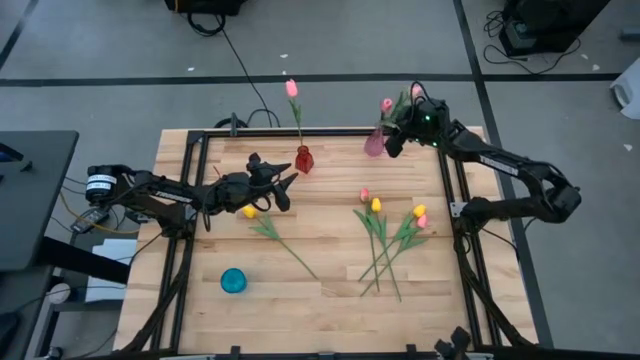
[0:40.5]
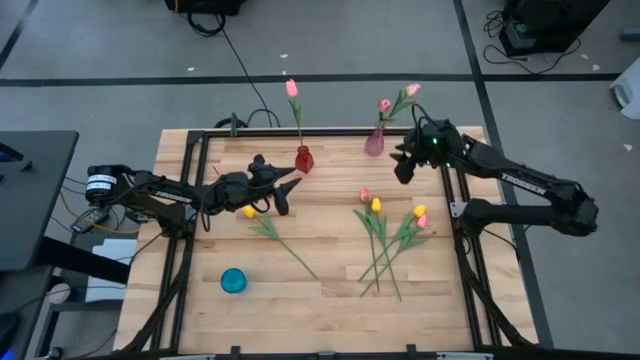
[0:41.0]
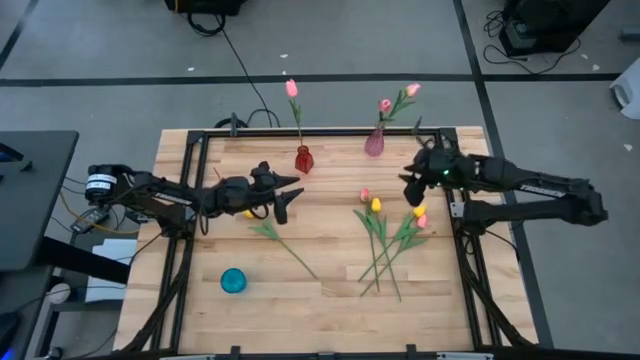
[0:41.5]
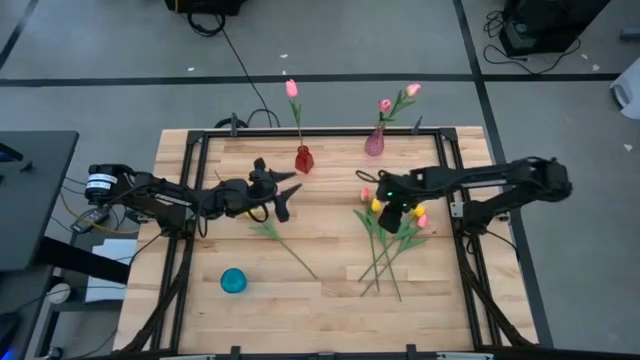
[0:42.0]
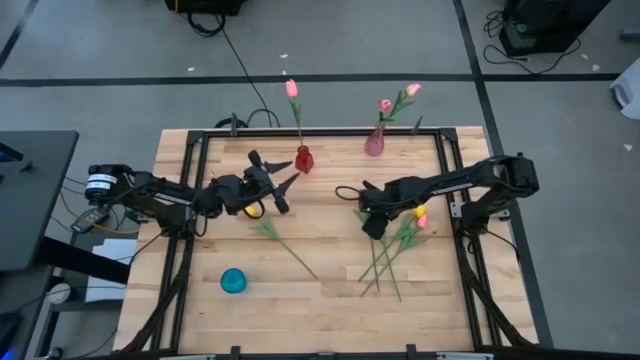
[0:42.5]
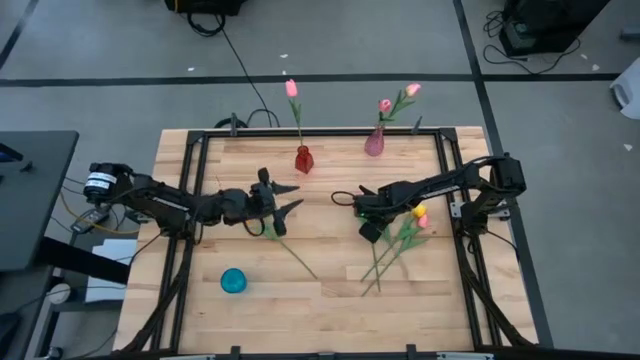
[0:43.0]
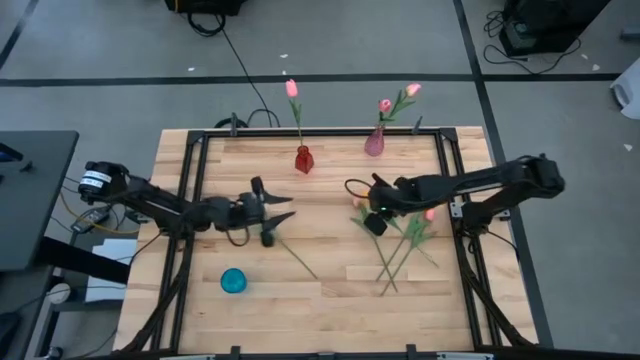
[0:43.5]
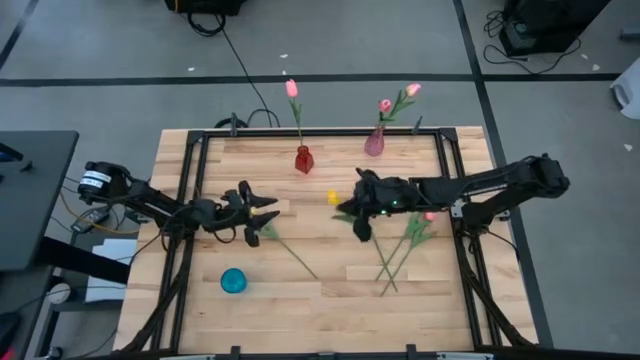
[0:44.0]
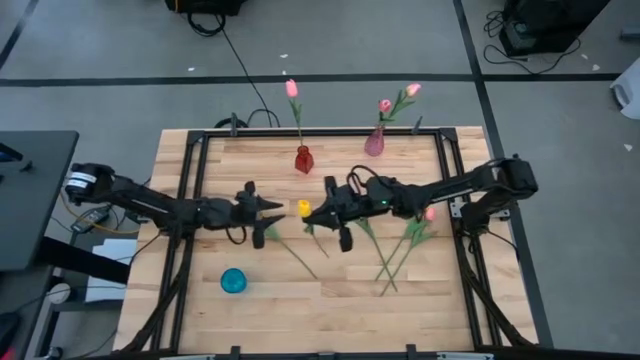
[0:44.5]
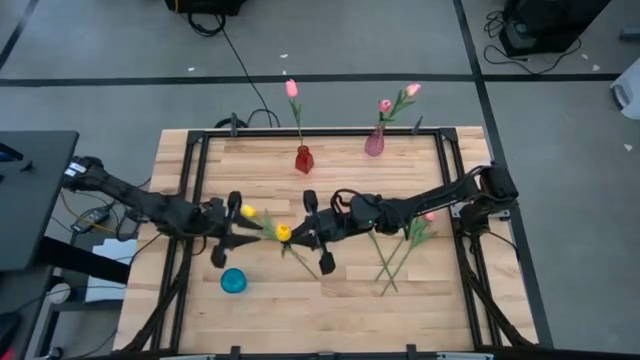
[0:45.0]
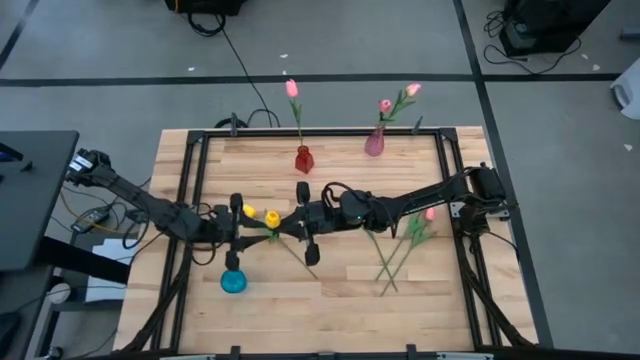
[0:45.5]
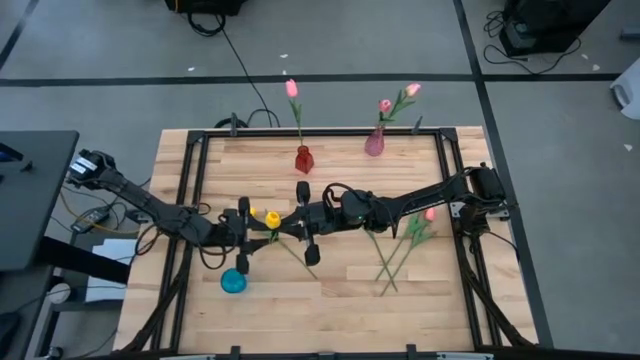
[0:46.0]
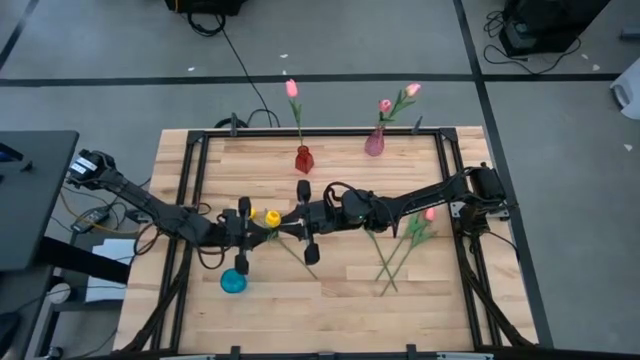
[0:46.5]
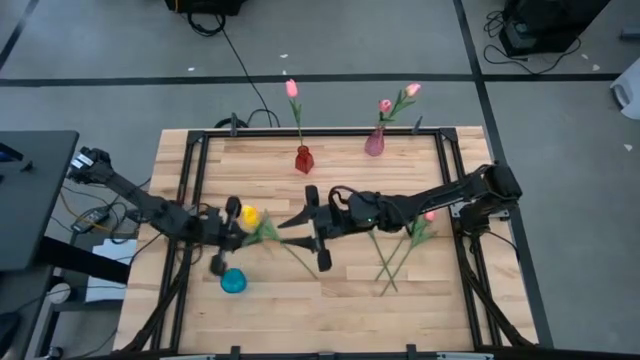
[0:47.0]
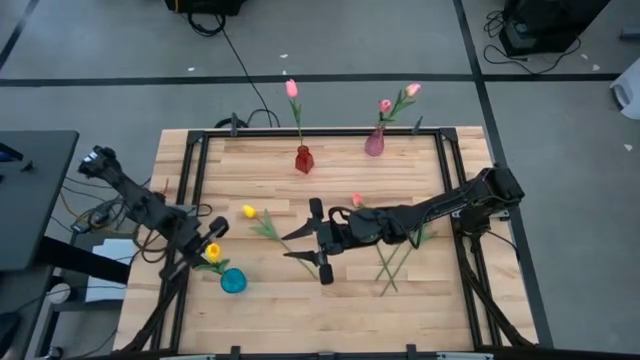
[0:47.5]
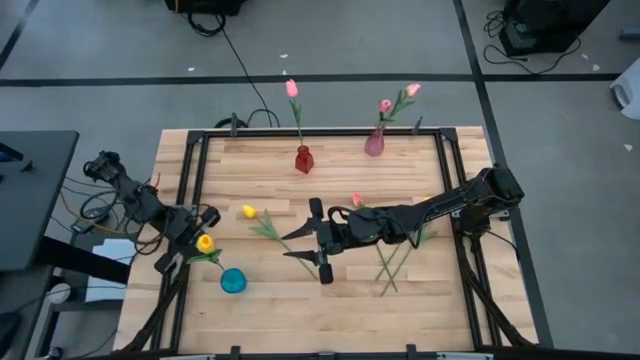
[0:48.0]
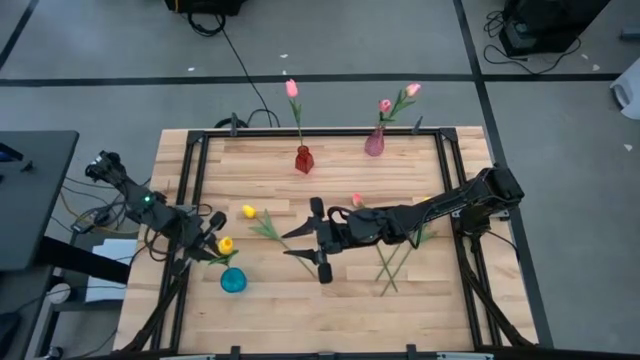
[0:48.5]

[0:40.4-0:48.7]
Task: Sort flowers into vase by color
Put the yellow tulip into the blue vase

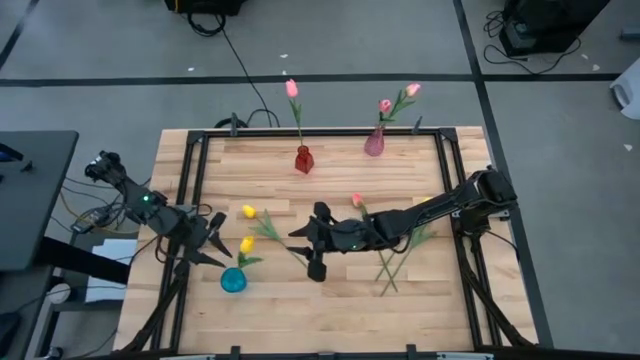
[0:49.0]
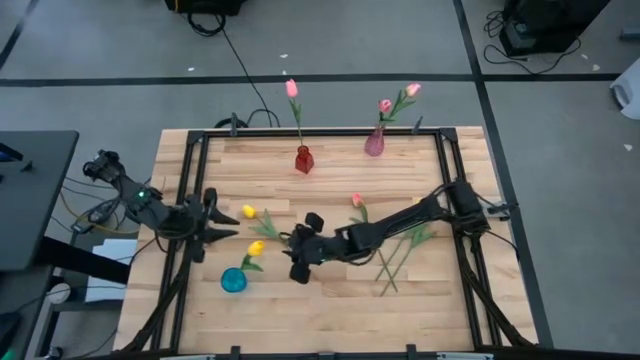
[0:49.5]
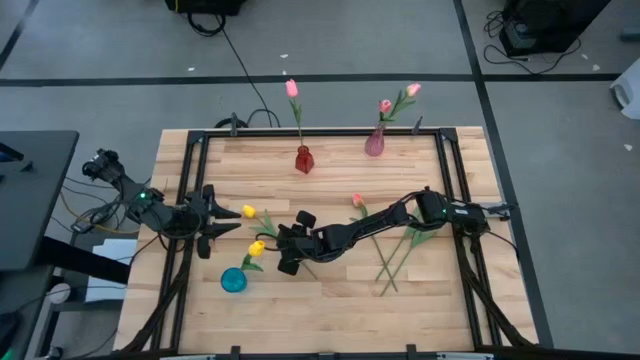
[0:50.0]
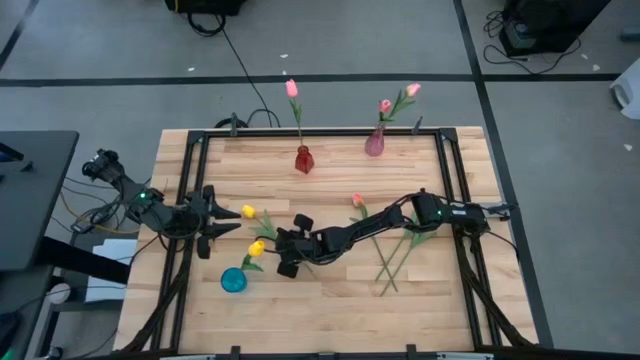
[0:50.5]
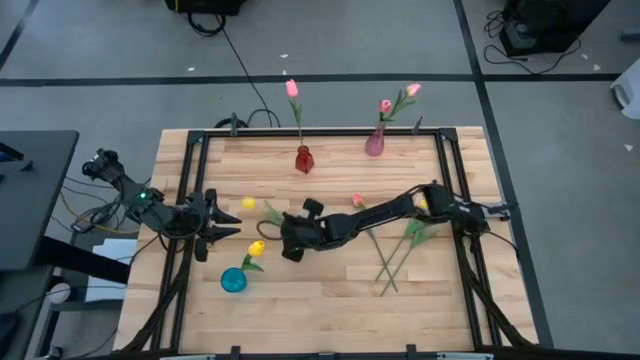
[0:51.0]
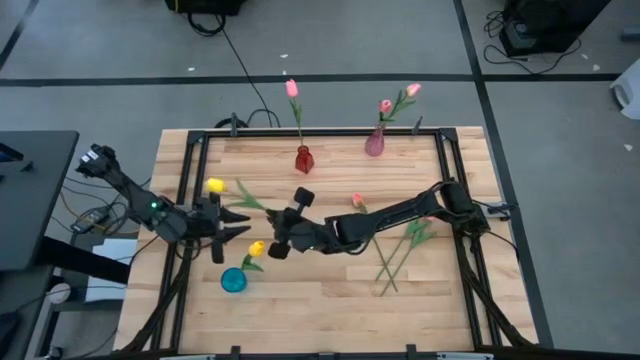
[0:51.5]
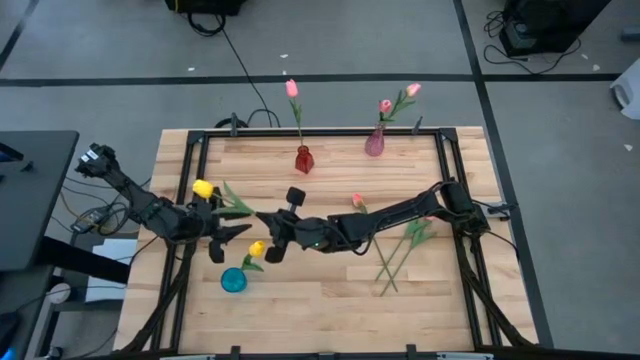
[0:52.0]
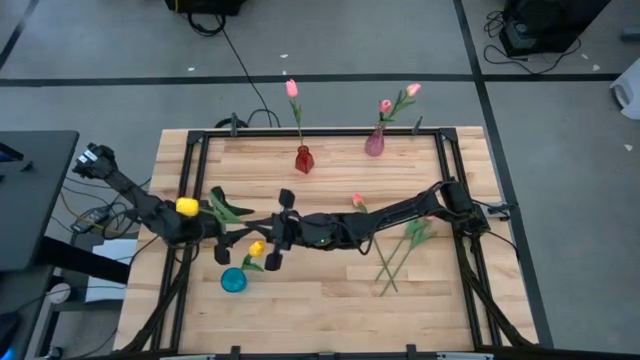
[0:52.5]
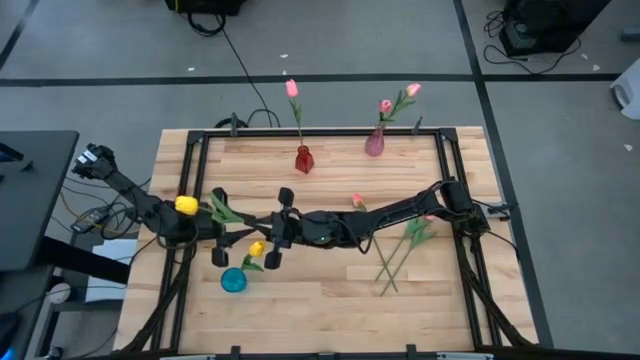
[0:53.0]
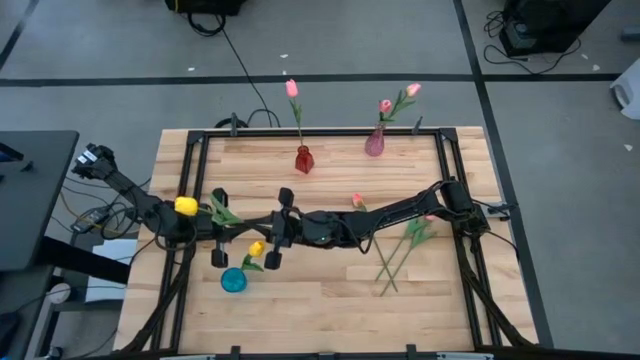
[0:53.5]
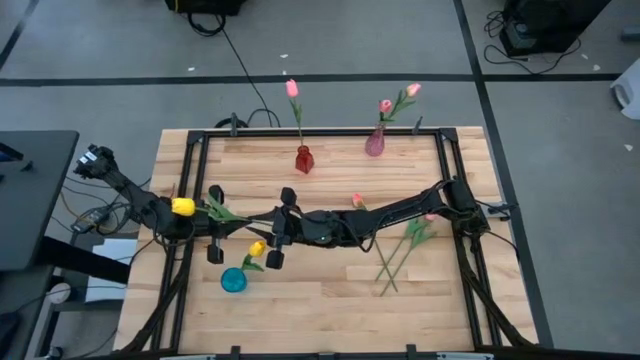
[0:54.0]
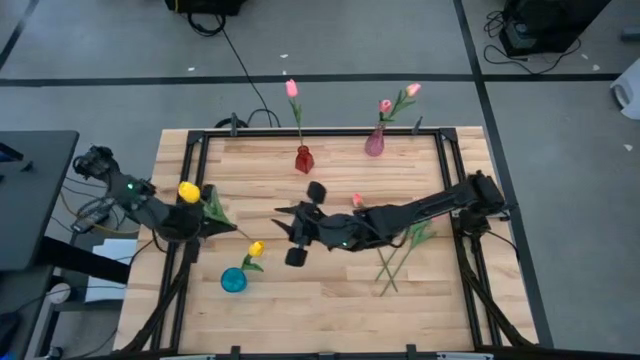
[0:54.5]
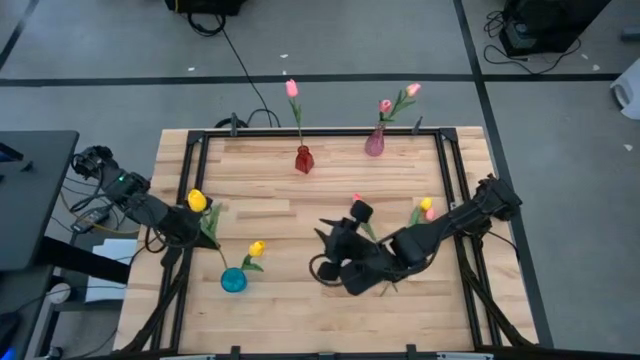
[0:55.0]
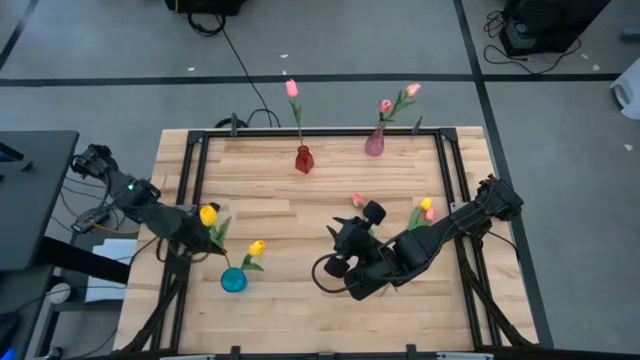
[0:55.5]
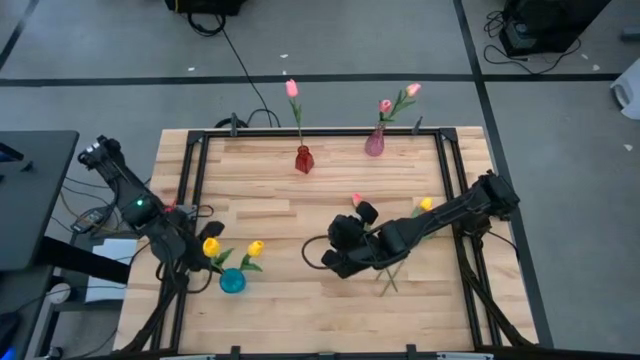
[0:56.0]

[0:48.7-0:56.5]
Put the yellow tulip into the blue vase

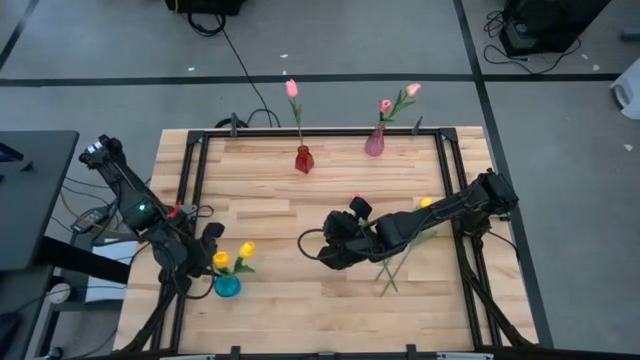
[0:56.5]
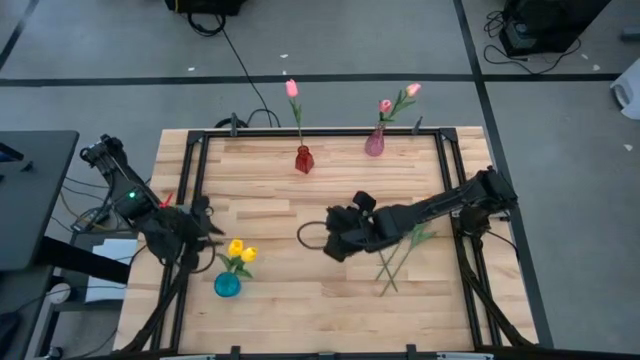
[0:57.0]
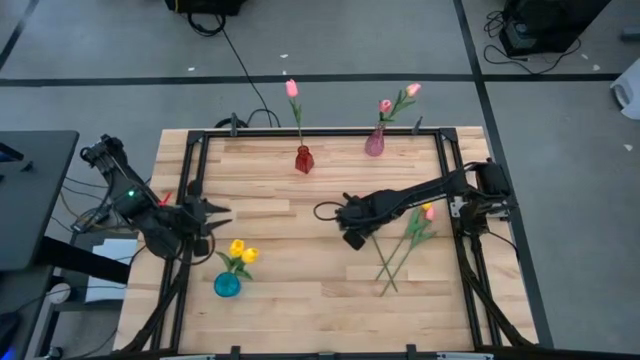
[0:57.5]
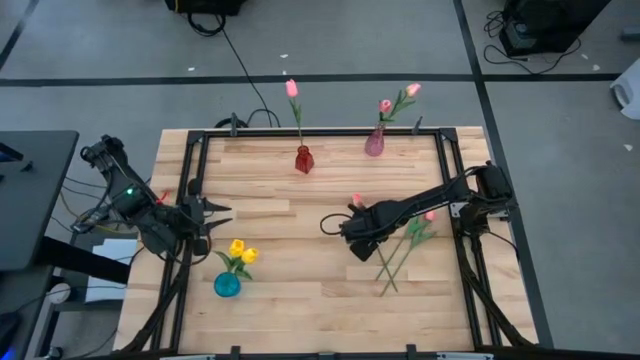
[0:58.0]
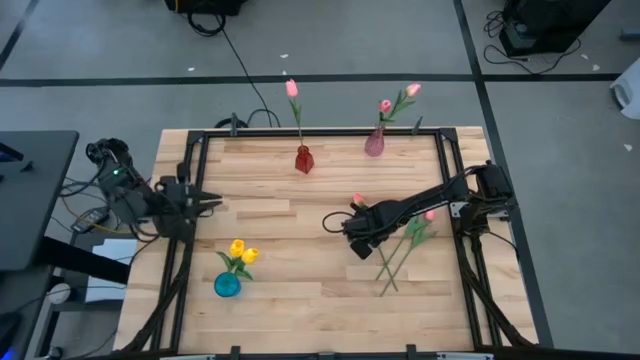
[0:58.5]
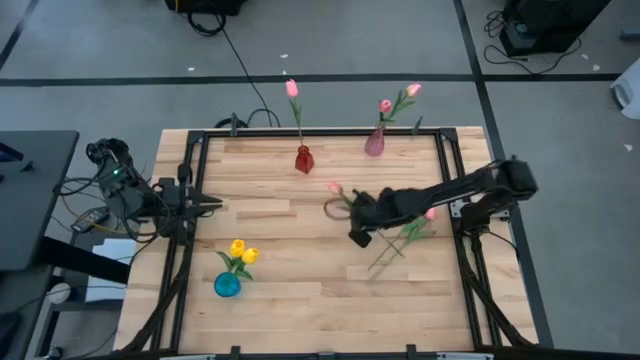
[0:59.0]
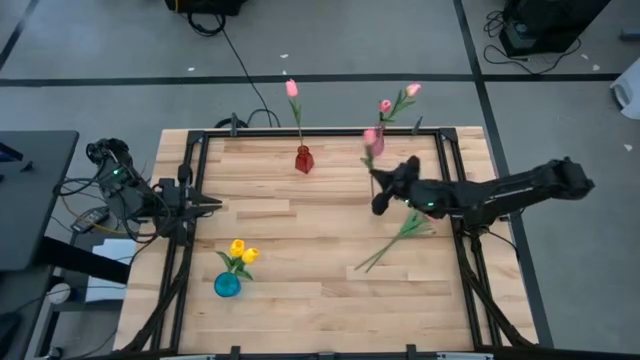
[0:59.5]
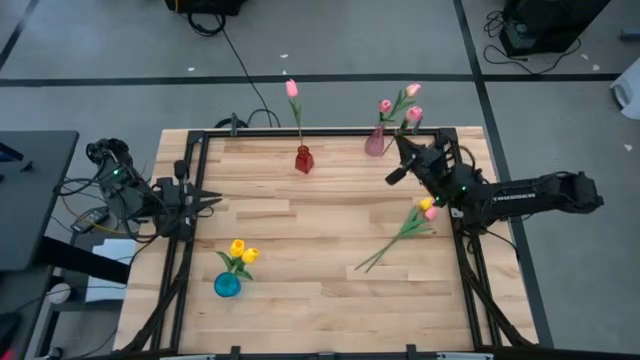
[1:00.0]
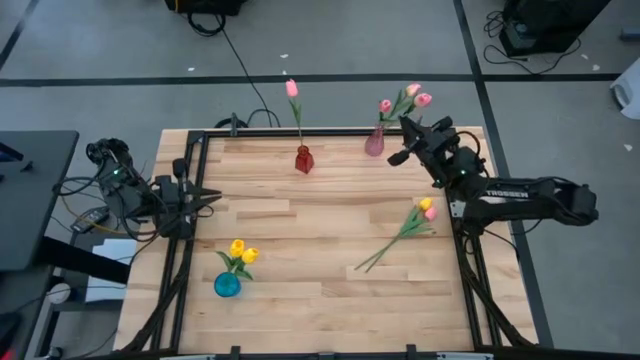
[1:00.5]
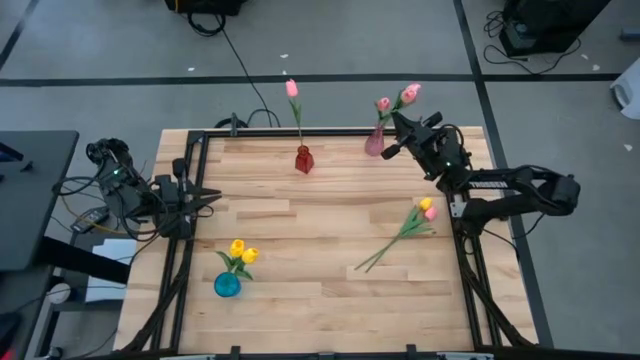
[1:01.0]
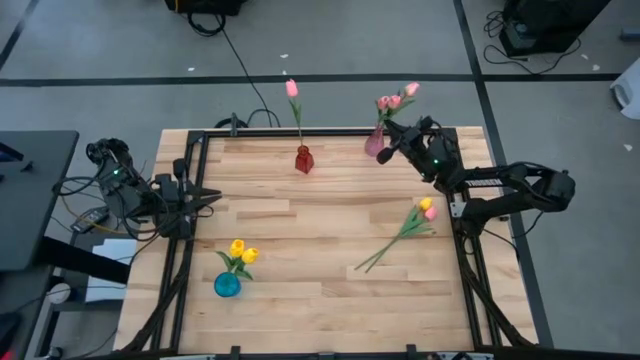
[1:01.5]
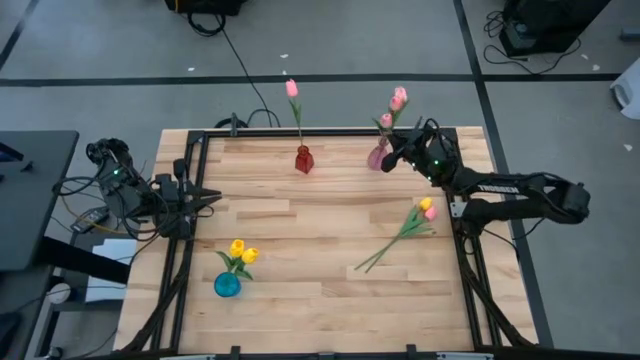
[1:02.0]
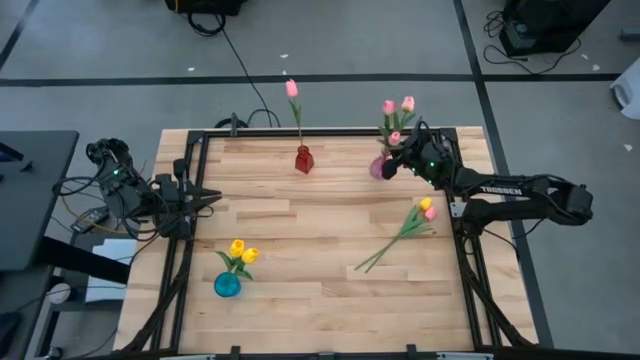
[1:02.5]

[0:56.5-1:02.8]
Put the pink white tulip into the pink vase
